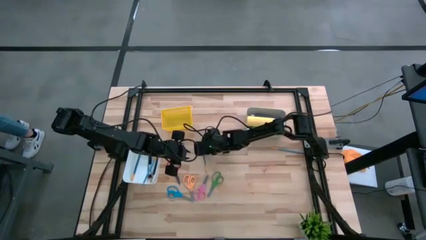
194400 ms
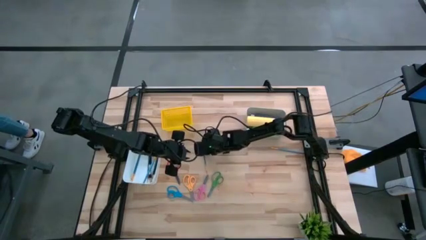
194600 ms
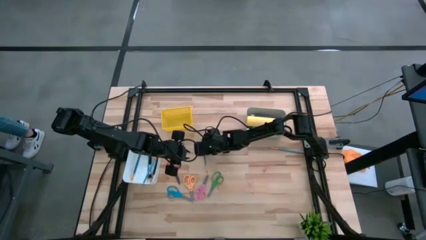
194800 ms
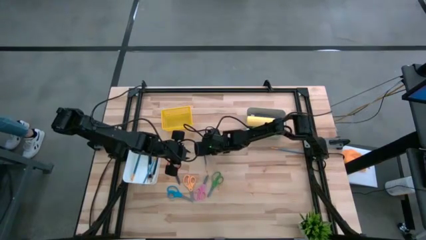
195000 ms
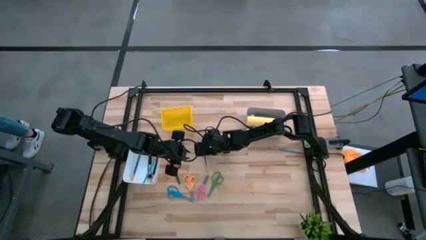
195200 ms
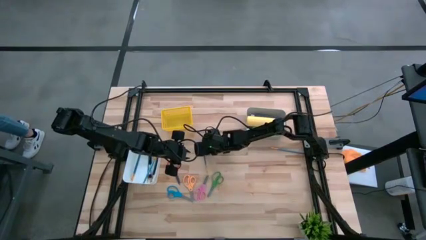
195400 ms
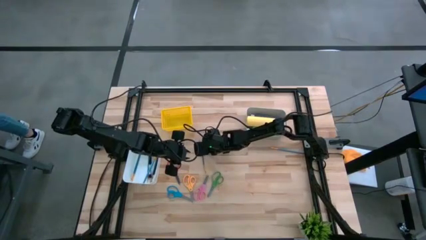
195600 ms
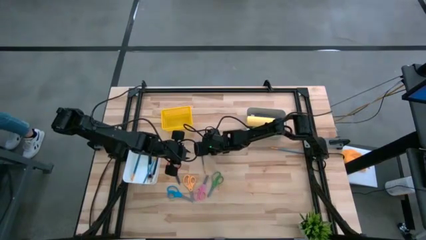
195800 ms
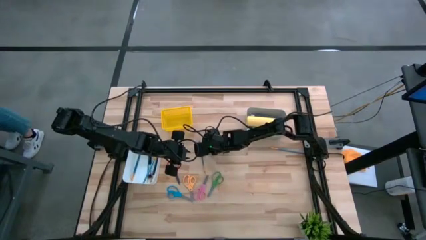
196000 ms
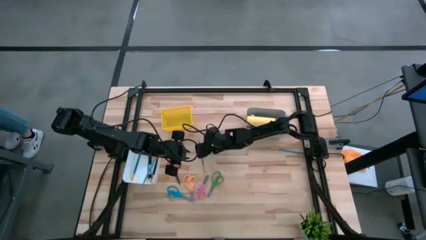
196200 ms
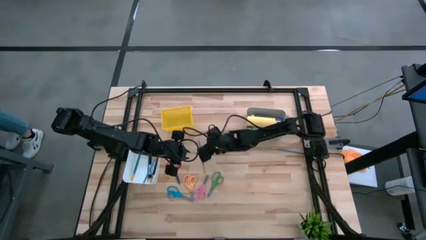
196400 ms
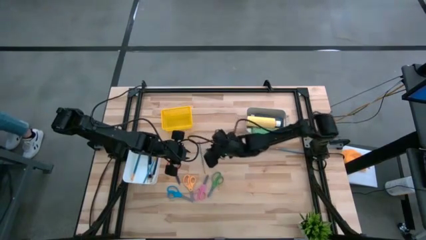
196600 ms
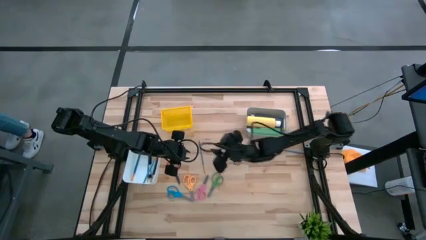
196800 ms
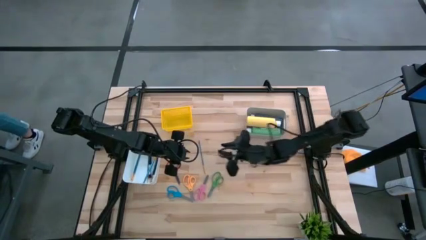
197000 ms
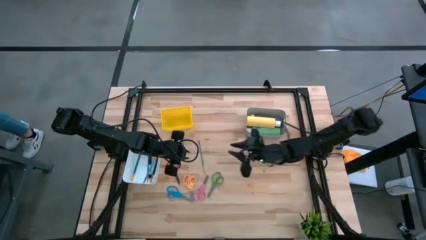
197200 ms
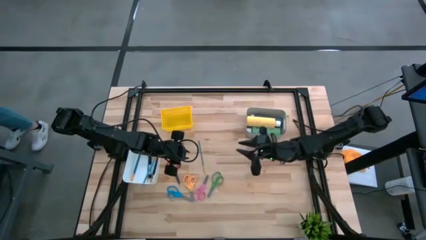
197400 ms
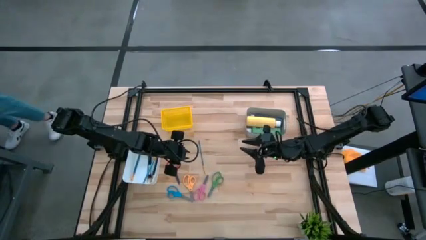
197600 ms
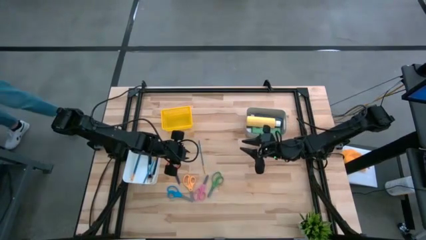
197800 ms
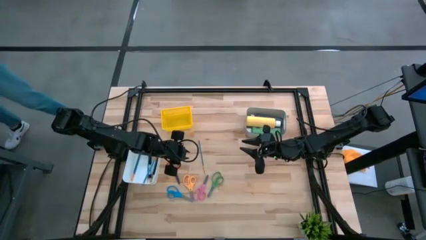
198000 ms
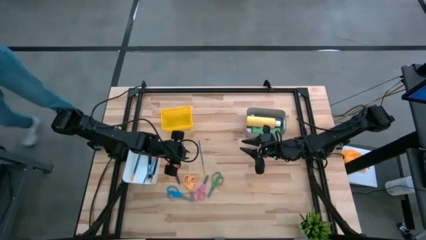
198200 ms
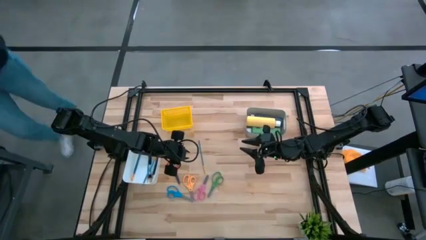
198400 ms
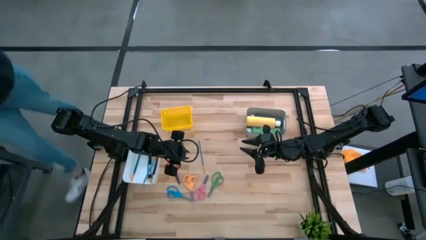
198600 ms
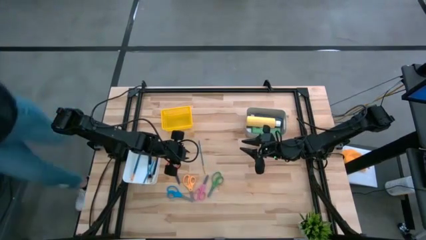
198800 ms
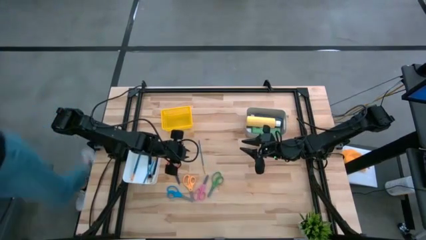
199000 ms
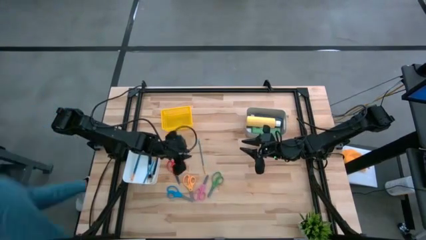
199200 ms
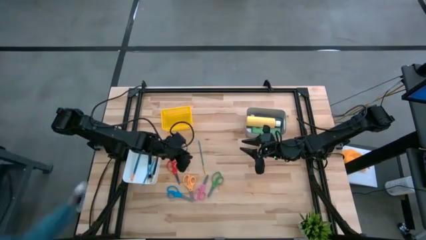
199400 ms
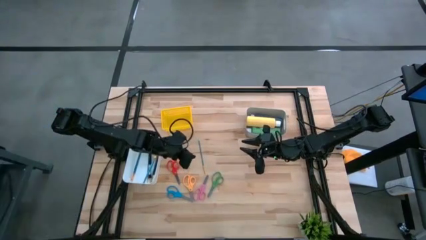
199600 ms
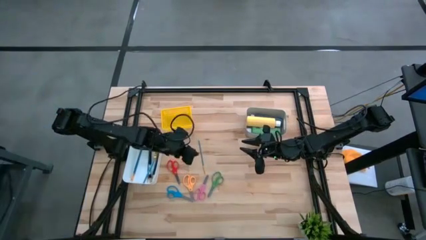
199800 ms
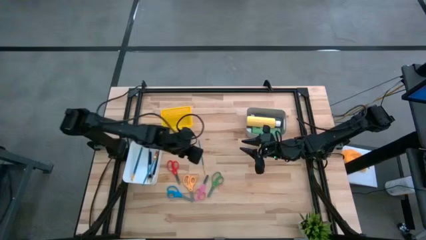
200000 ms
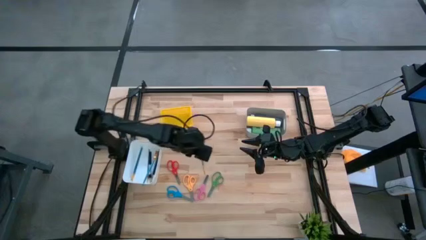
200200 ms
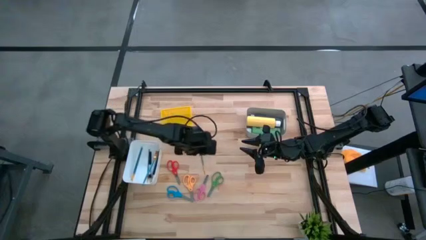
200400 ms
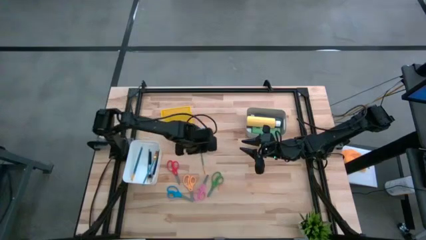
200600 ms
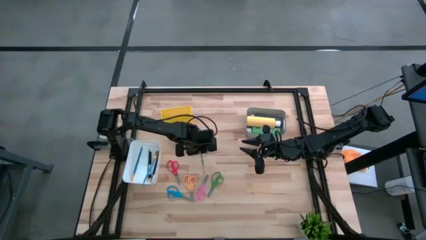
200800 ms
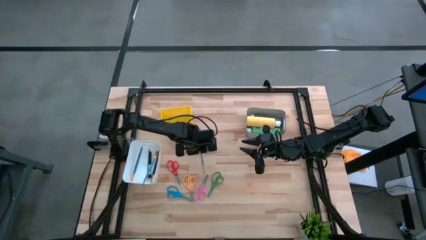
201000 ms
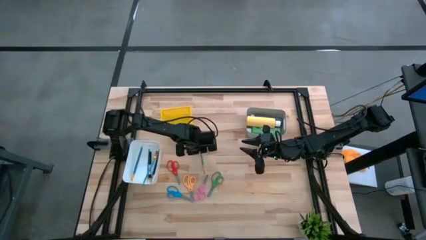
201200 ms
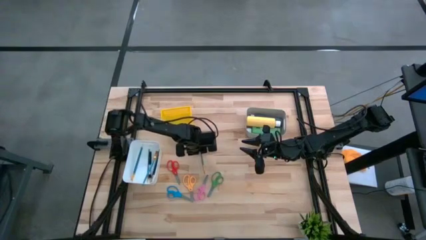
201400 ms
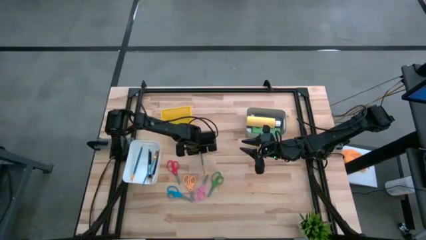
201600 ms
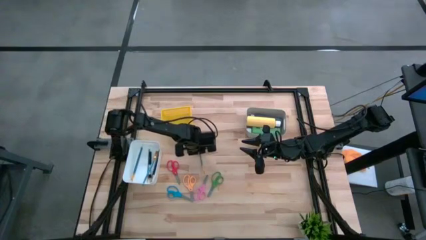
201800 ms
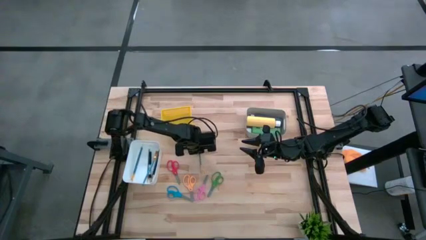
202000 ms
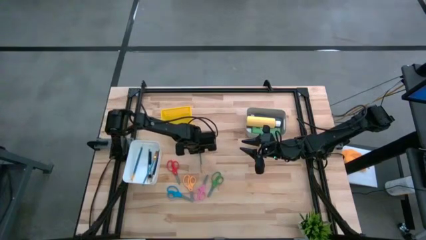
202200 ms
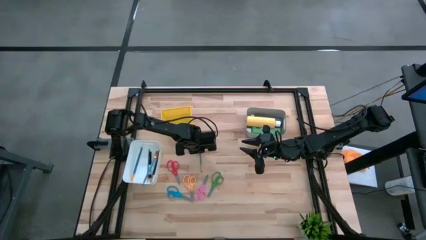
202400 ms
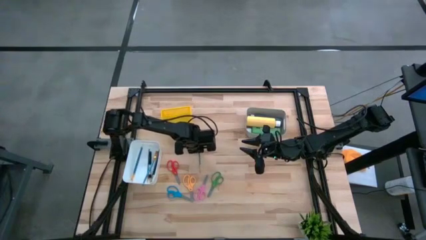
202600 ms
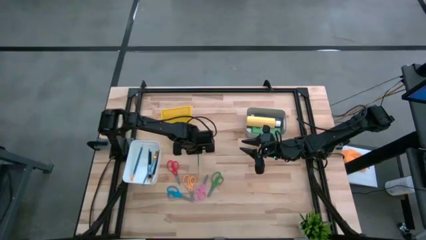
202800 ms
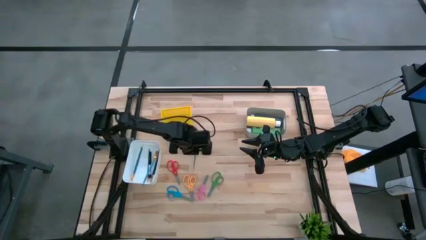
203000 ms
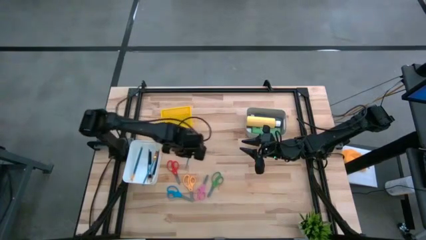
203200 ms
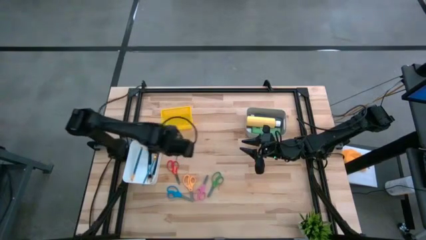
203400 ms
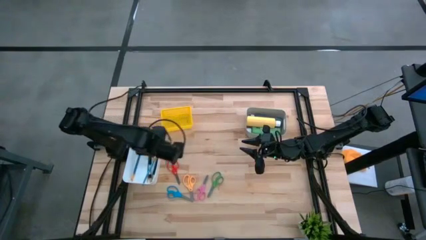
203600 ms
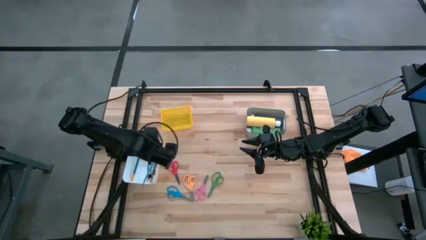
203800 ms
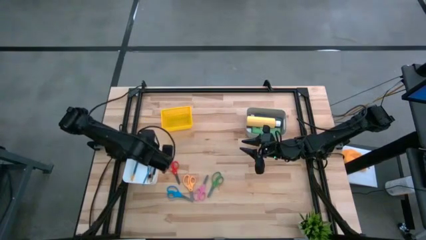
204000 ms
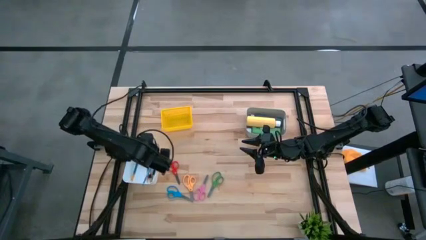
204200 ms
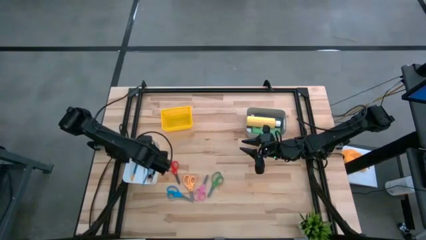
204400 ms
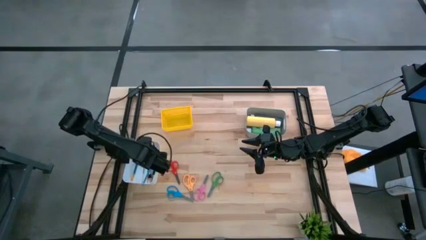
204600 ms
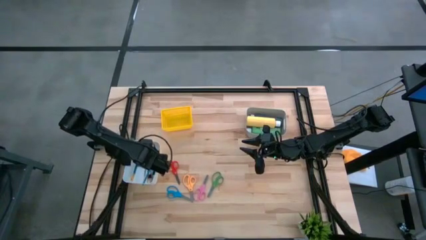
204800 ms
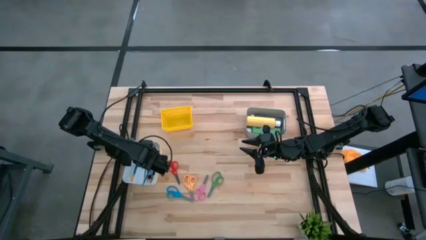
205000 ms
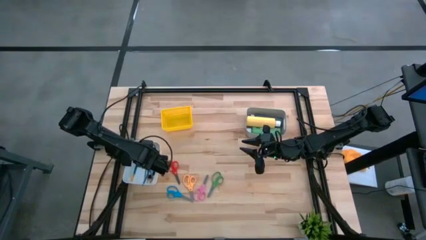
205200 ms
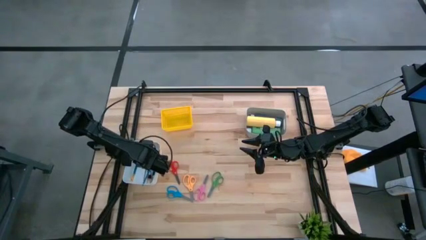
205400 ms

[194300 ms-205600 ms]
Task: Pick & Place Paint Supplies
Put the blue paintbrush into the white bin

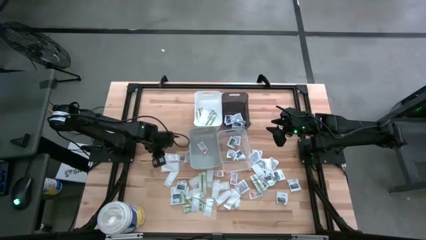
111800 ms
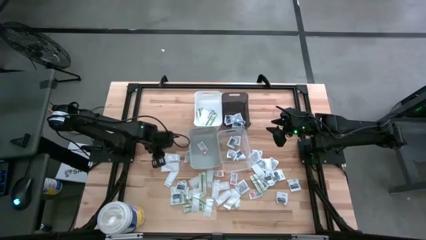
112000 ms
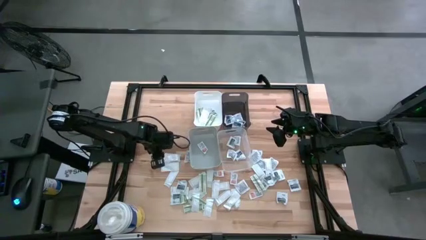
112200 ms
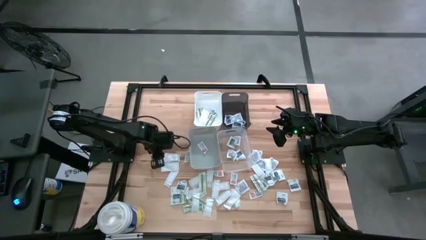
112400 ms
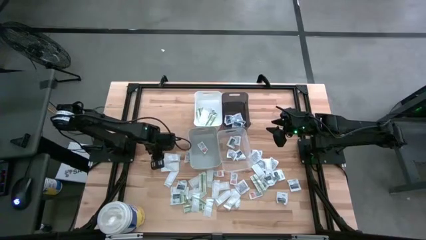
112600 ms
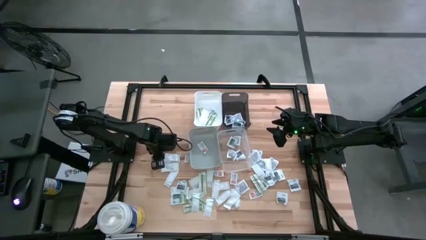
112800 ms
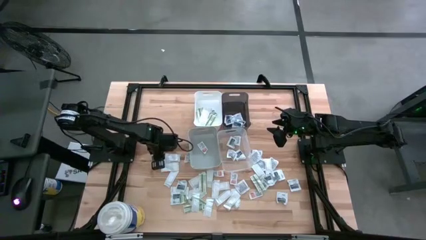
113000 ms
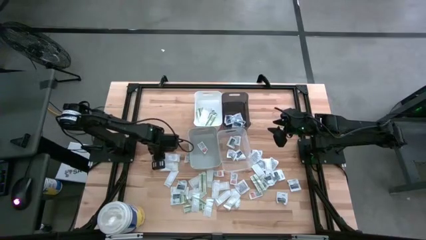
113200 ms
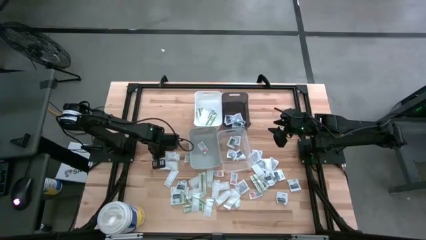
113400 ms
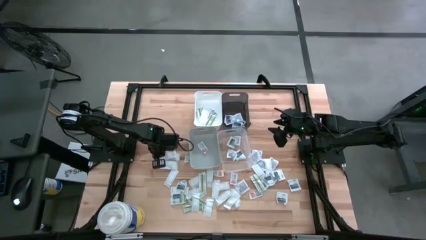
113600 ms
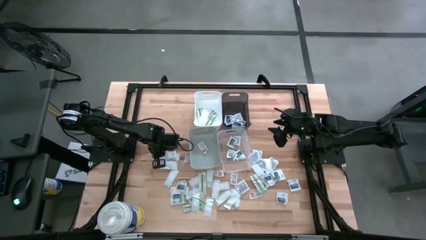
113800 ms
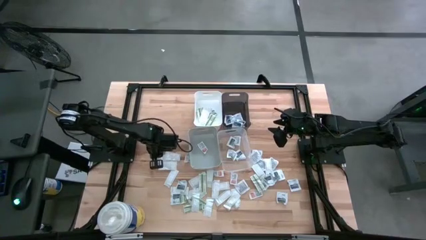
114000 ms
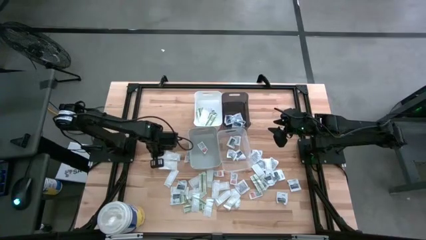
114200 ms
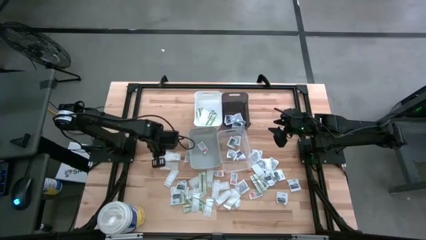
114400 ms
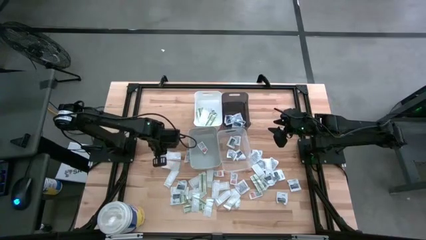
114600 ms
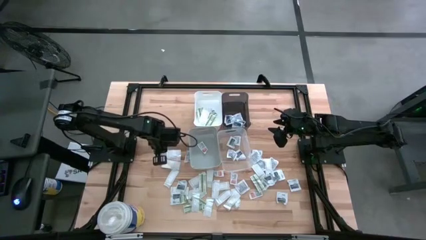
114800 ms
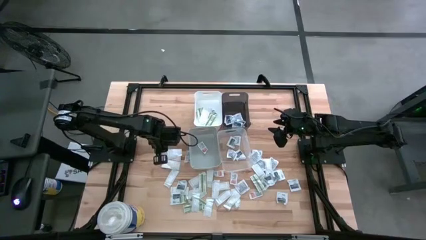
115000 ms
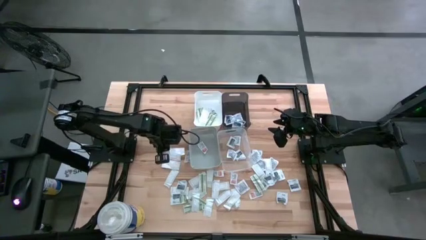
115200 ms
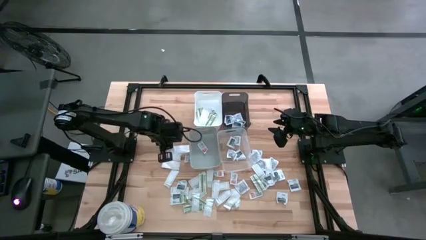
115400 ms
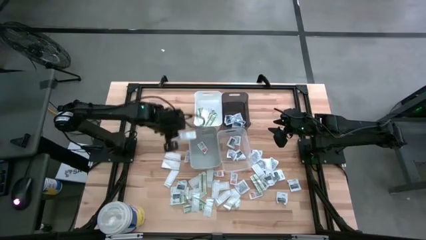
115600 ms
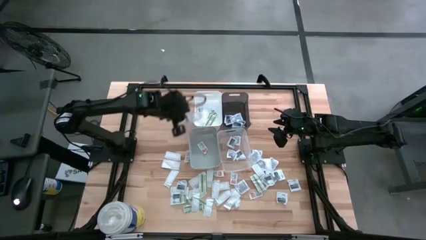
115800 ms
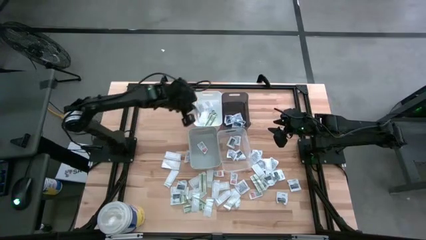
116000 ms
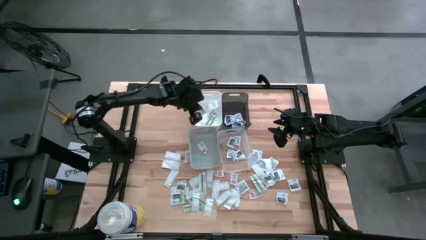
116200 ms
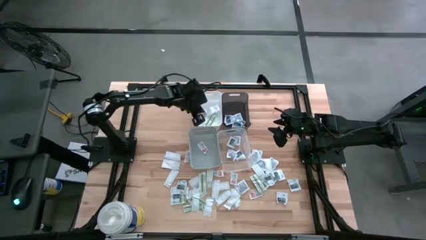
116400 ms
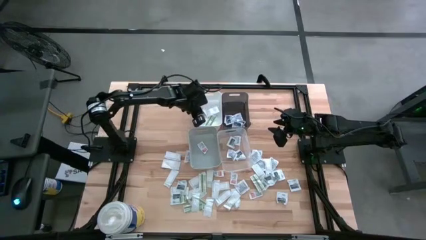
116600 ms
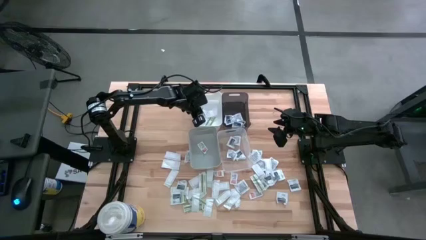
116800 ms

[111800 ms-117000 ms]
Task: Pick & Place First Aid Supplies
Put the green bandage pack into the white bin
